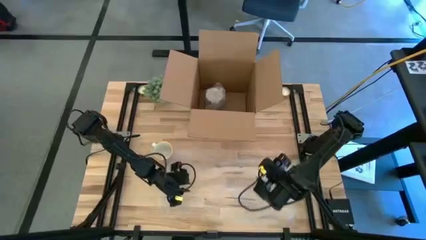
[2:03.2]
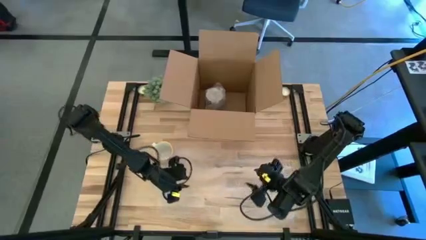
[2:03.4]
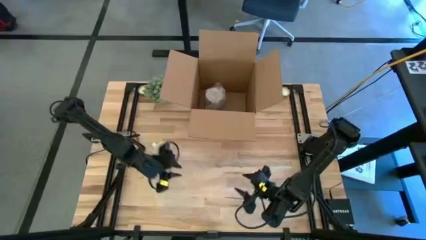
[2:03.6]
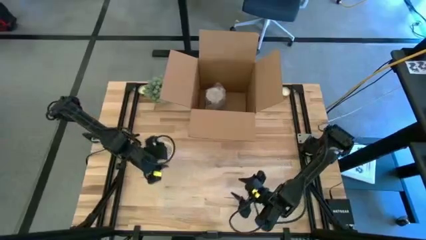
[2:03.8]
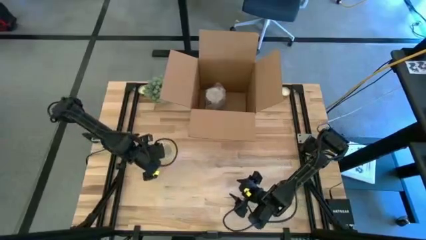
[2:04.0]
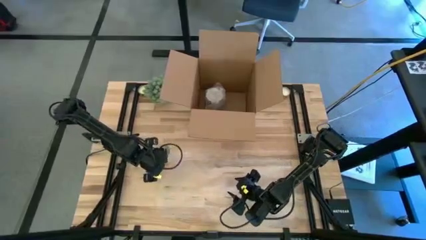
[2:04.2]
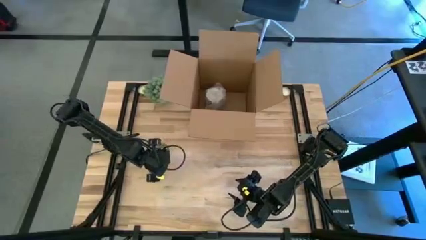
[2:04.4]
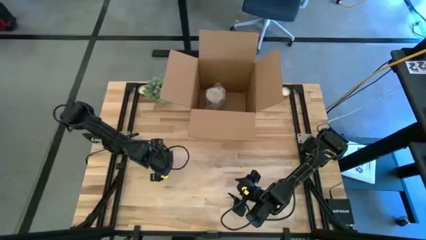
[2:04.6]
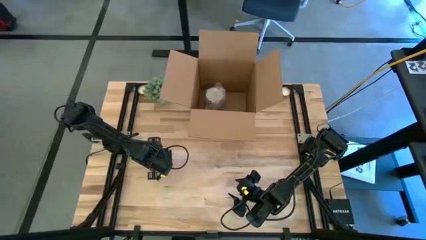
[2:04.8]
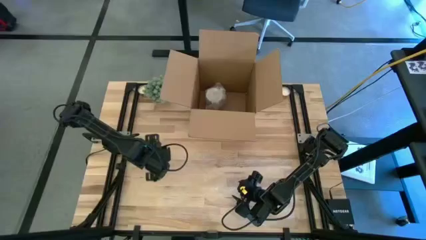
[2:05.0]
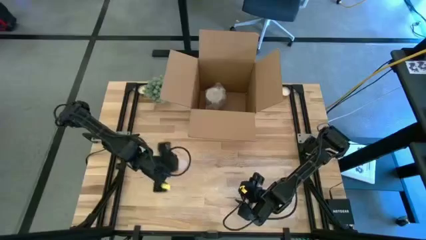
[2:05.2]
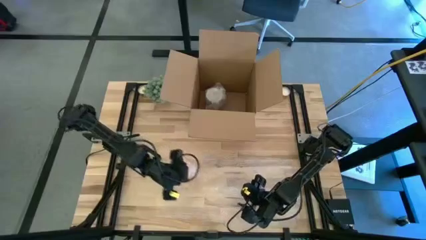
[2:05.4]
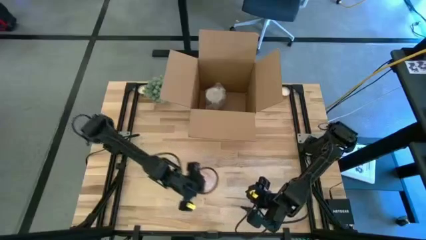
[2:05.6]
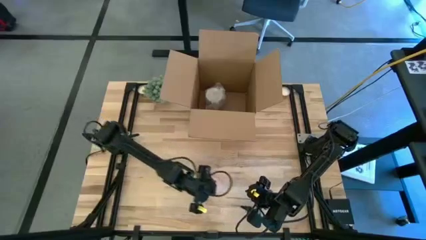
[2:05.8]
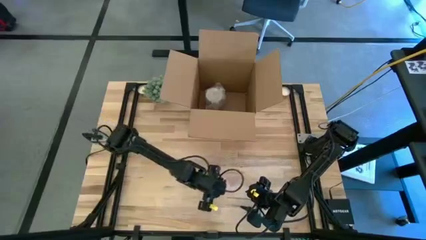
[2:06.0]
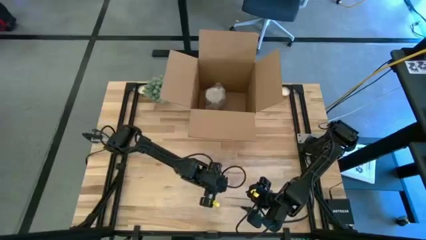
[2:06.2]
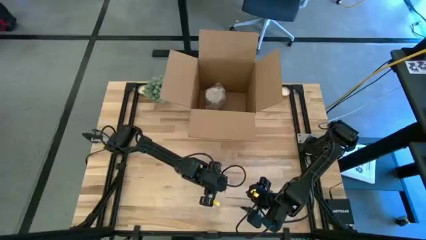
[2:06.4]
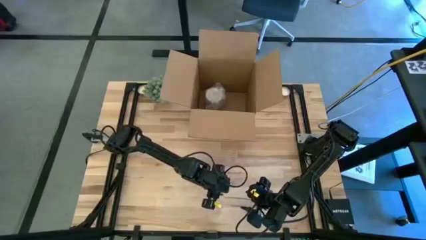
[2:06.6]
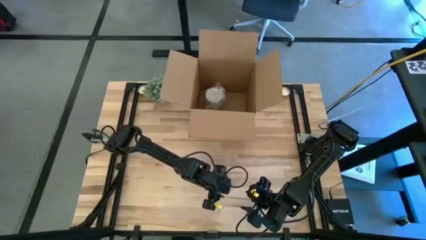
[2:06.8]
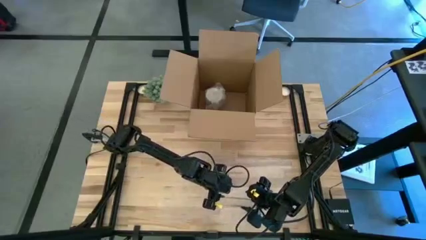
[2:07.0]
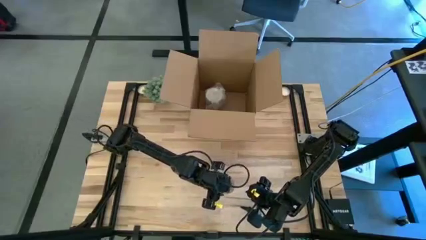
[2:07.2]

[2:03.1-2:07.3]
Task: wrap mug
Put the orange mug on top of the bubble wrap on the table

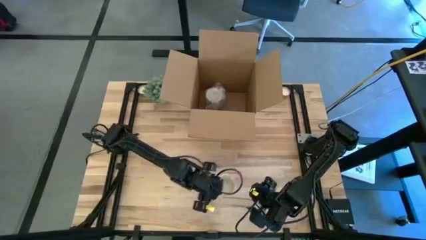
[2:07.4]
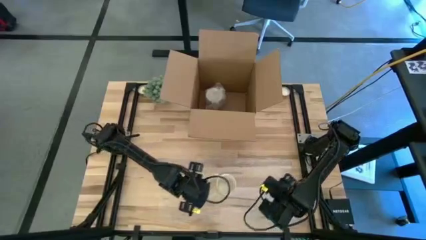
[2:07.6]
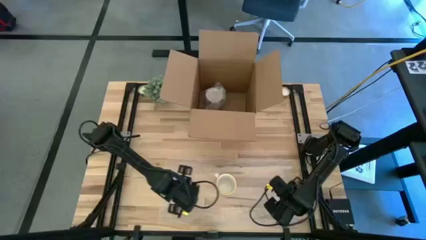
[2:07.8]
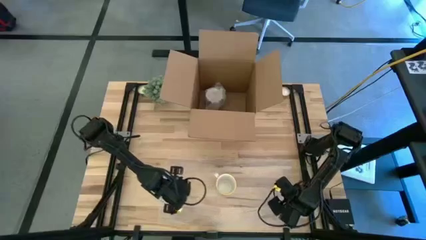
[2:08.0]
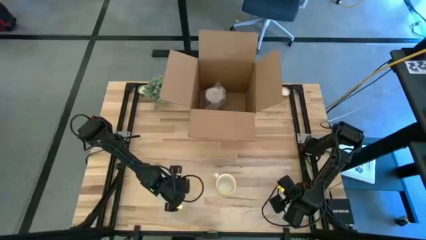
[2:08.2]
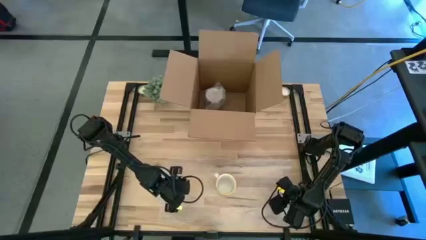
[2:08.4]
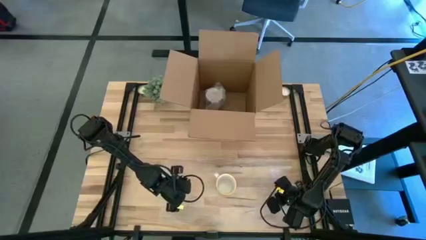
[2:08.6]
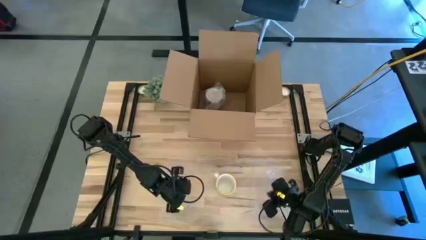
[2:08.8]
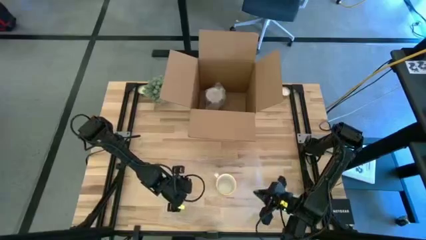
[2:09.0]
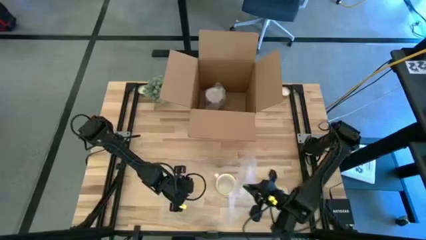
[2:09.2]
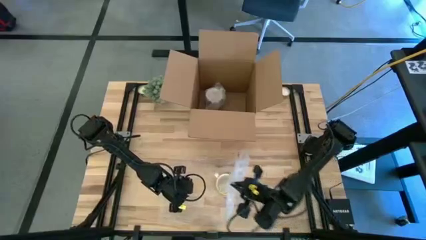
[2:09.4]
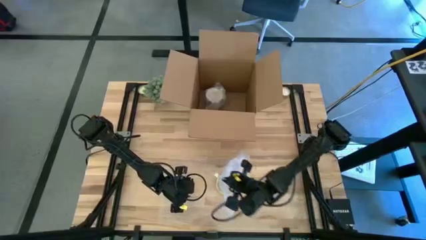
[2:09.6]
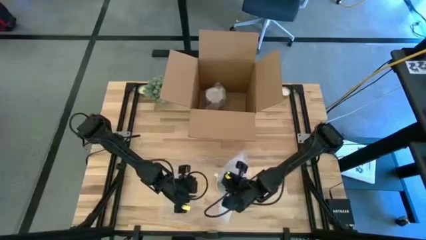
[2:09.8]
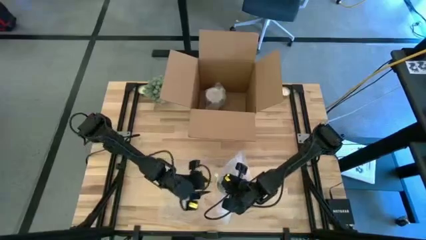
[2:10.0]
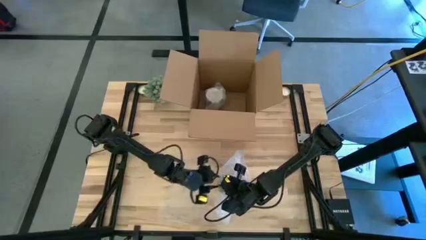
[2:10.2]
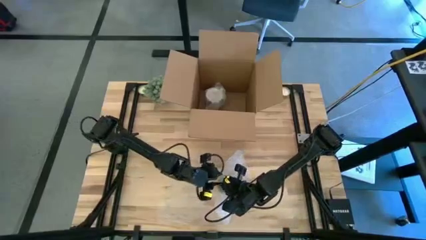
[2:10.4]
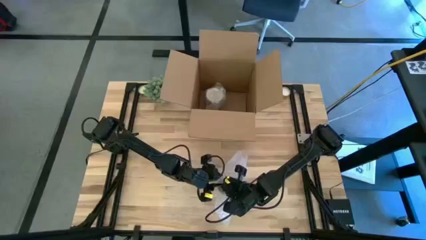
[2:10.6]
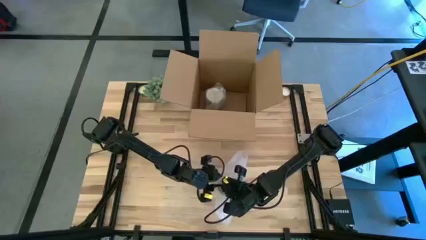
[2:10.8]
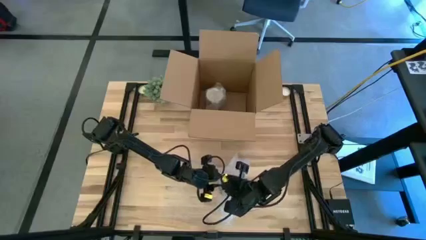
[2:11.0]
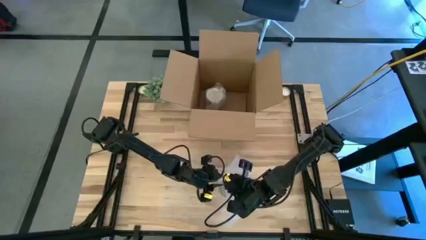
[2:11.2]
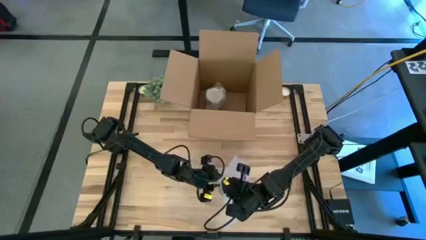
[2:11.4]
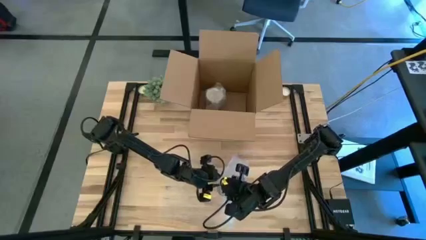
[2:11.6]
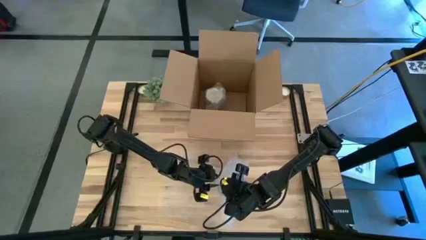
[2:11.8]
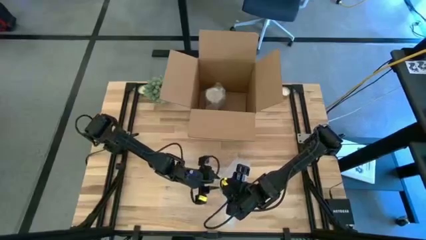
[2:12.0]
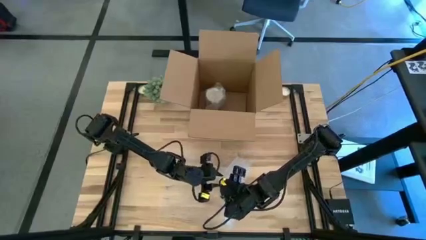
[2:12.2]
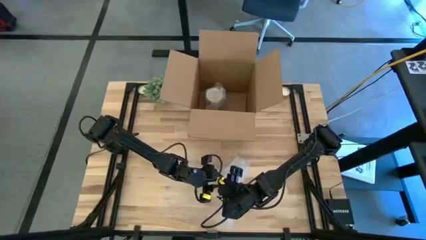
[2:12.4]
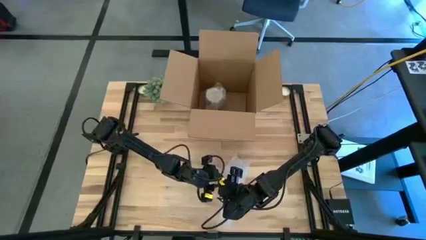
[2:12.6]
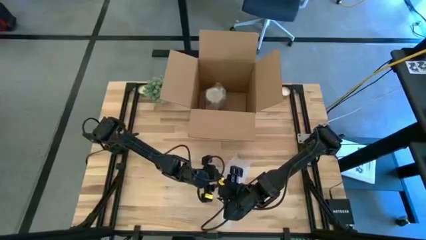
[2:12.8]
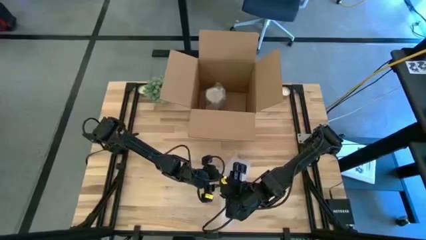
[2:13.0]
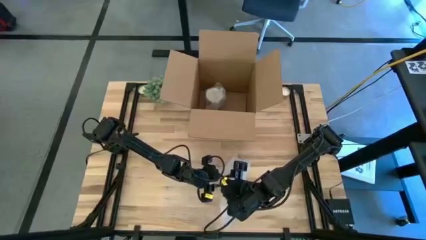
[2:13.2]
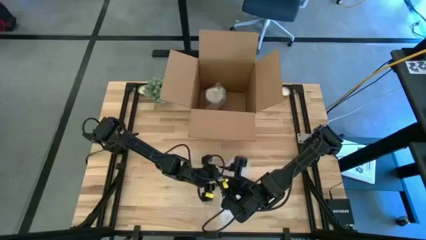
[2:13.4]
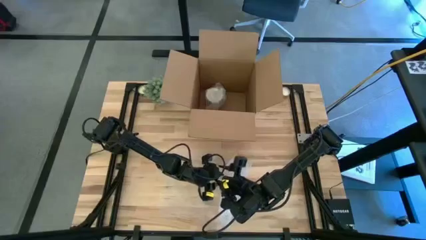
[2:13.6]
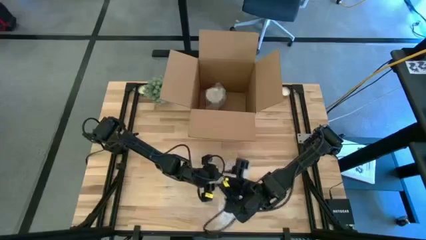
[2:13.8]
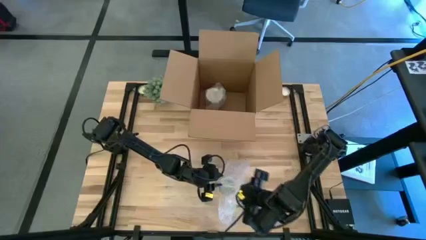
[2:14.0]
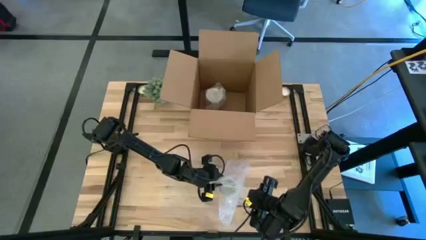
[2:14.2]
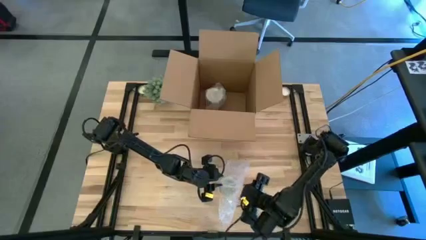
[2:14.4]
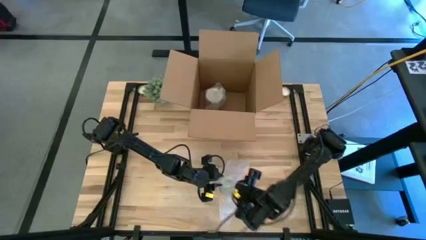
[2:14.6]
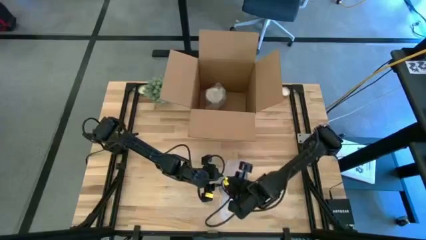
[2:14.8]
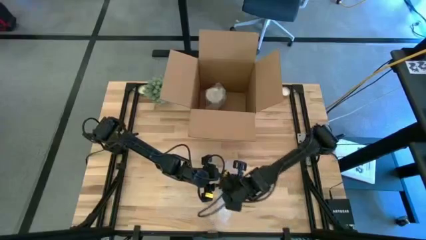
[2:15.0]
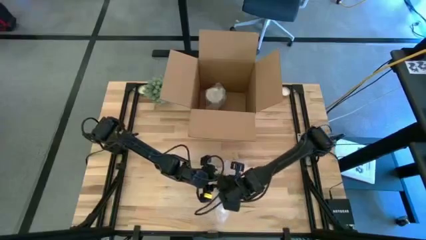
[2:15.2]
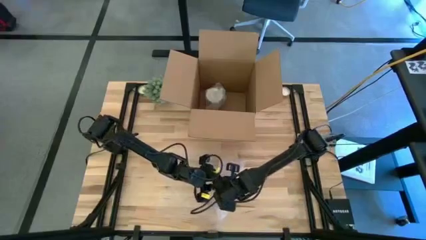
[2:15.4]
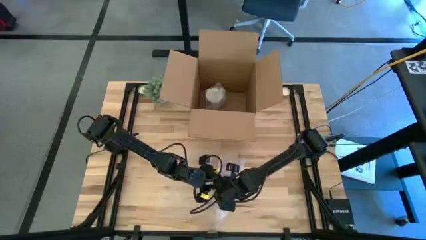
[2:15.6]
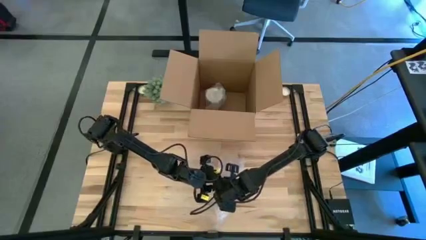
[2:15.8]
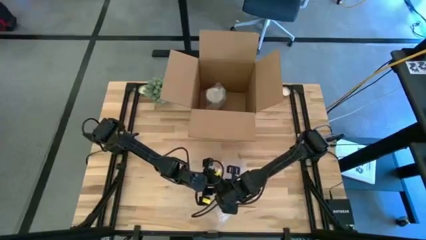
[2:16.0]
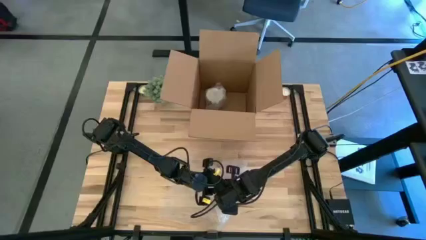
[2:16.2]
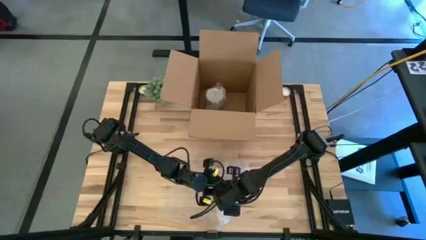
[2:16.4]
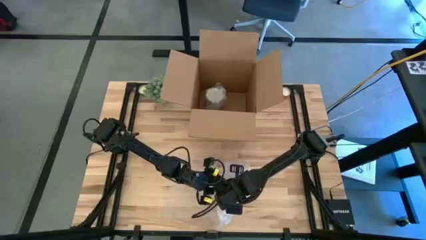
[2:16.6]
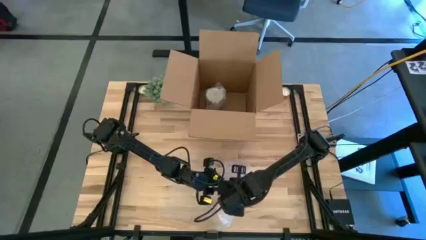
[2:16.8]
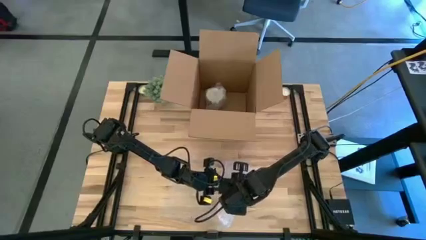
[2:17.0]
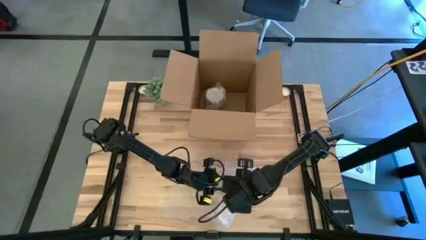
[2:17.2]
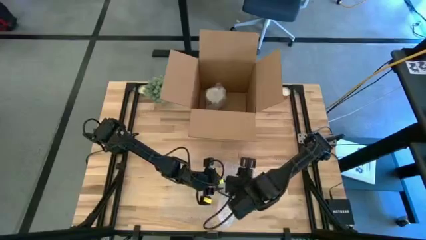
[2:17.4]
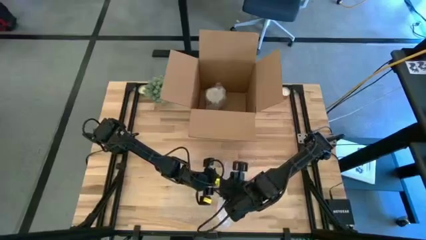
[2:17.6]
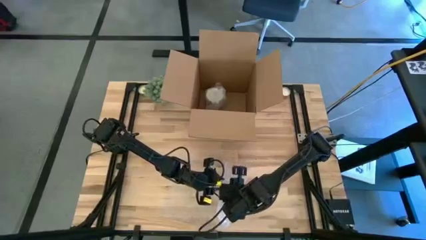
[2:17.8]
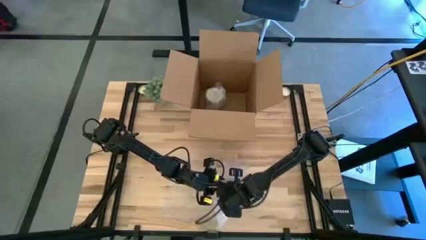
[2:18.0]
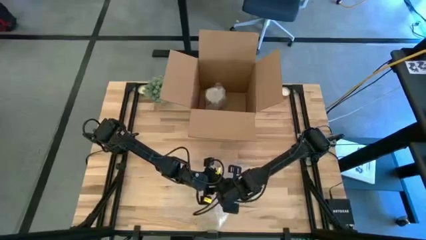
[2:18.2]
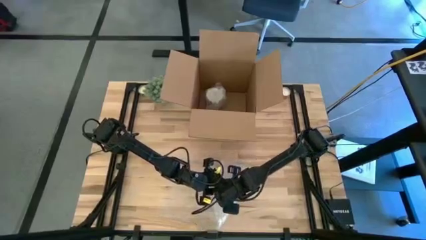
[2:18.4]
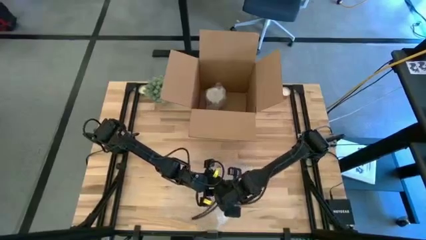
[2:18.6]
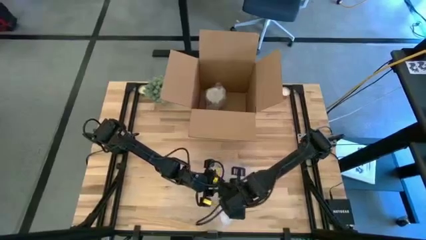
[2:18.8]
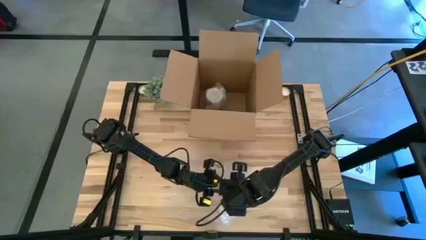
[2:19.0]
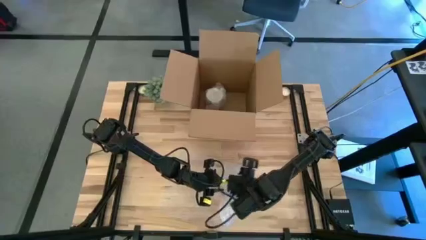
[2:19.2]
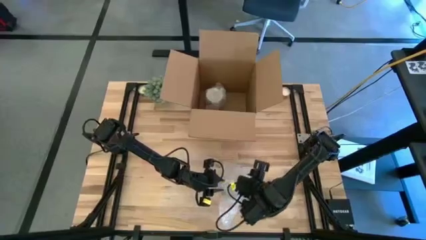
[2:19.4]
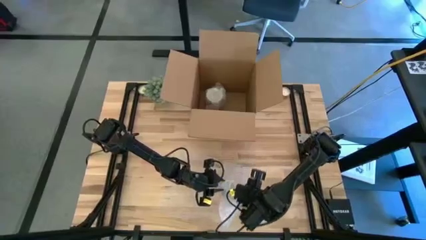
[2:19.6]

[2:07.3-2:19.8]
Wrap the orange mug with bubble wrap
